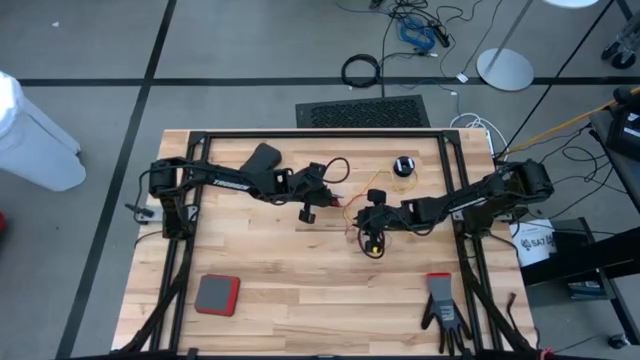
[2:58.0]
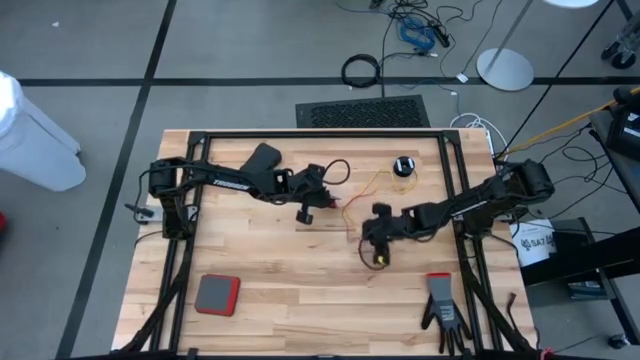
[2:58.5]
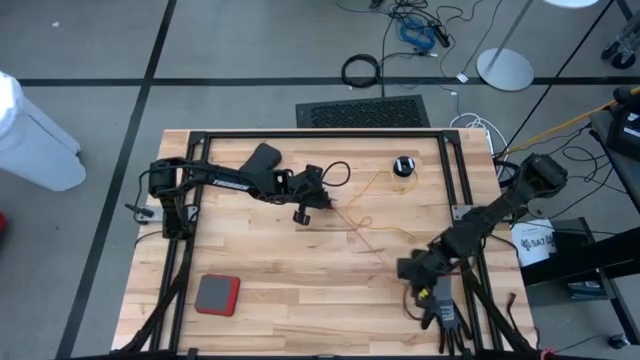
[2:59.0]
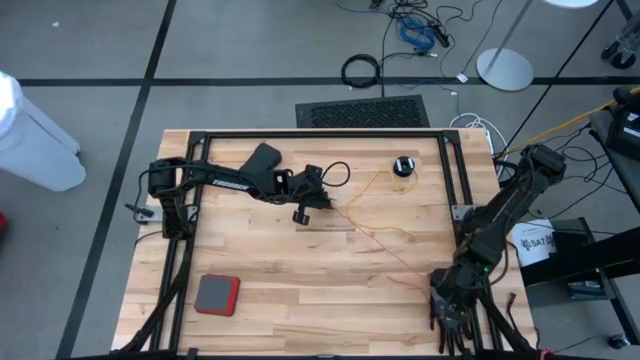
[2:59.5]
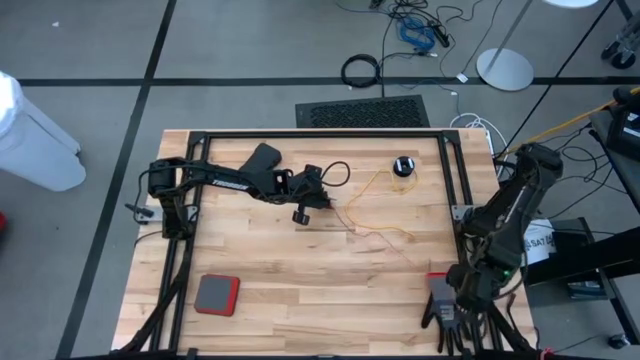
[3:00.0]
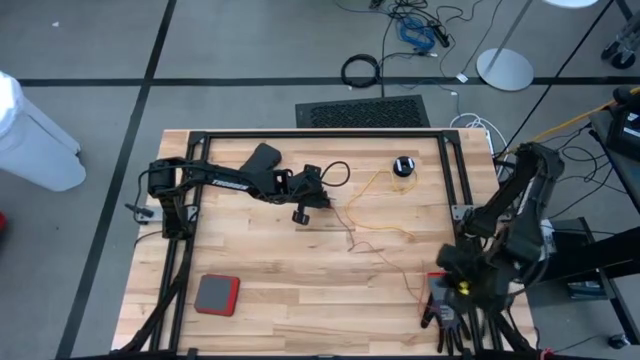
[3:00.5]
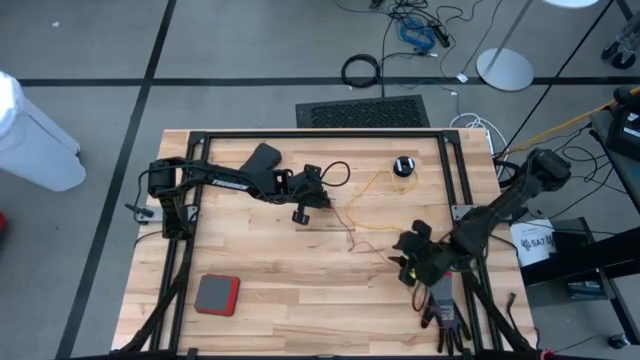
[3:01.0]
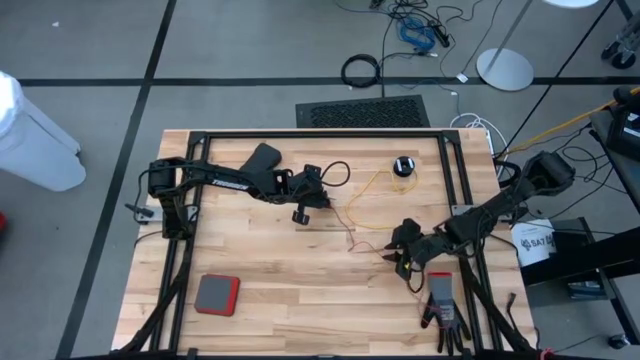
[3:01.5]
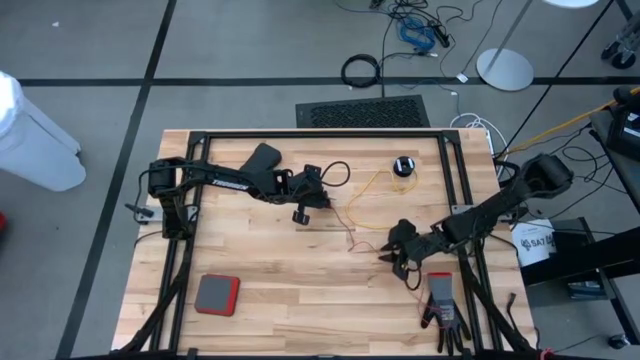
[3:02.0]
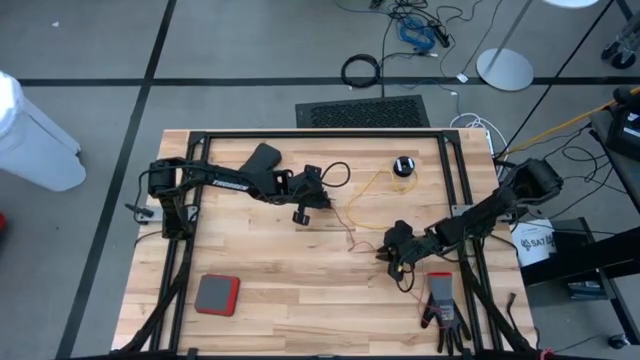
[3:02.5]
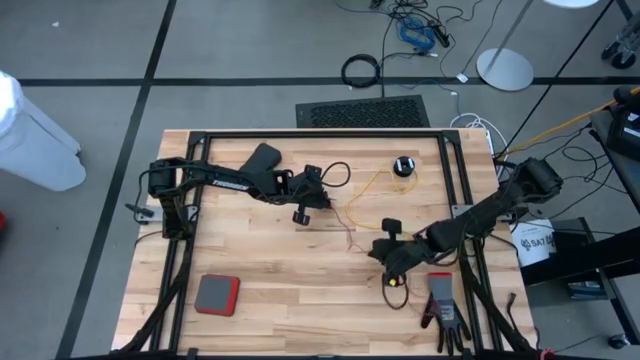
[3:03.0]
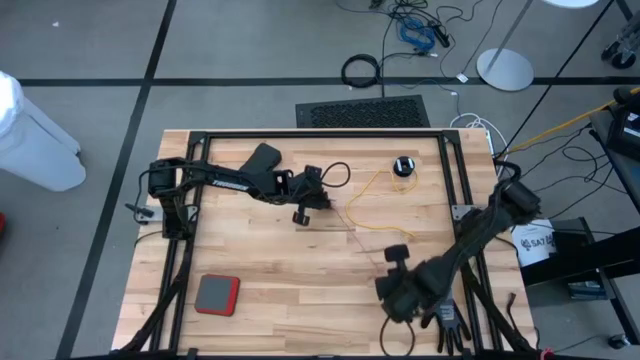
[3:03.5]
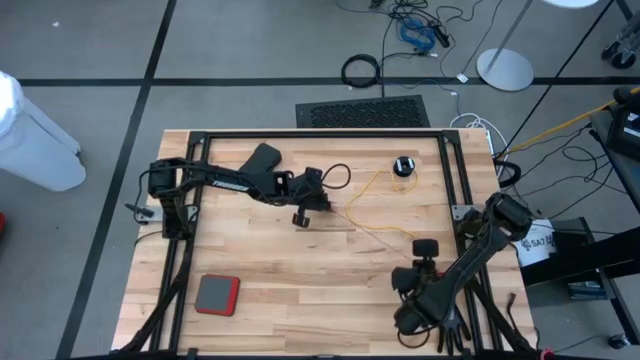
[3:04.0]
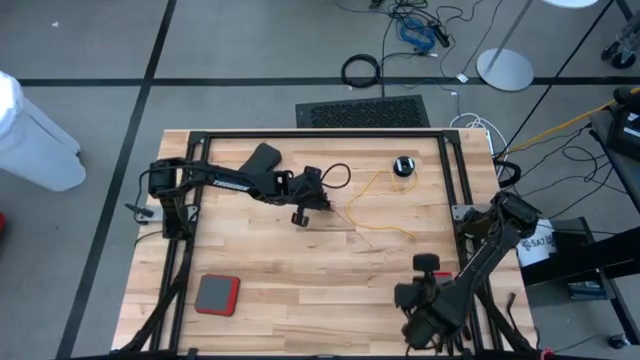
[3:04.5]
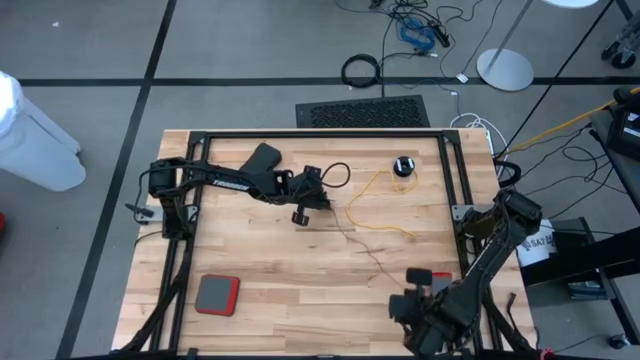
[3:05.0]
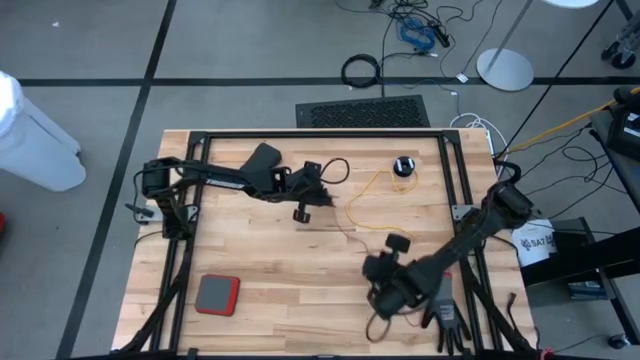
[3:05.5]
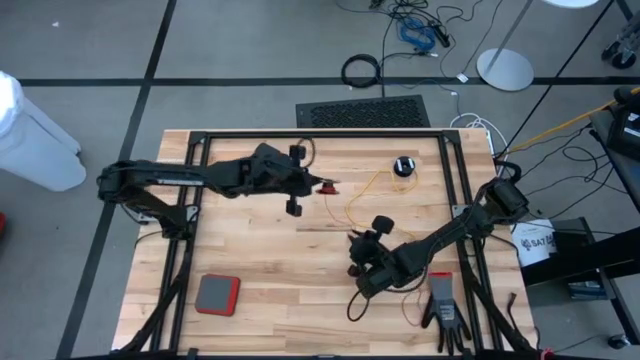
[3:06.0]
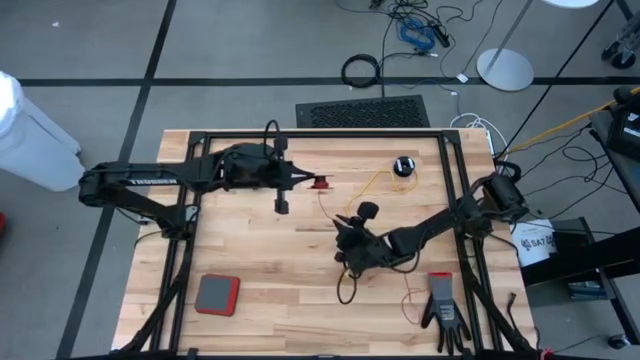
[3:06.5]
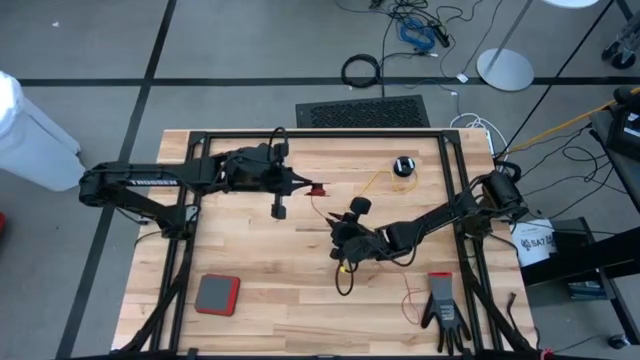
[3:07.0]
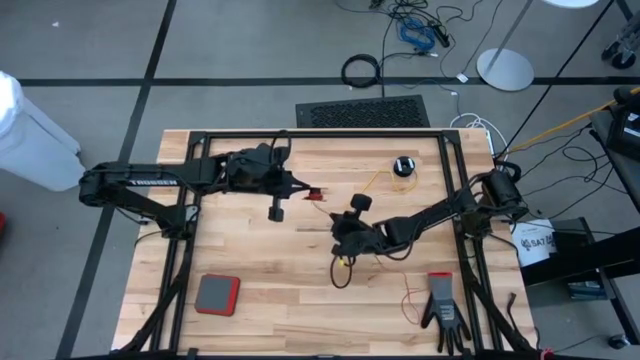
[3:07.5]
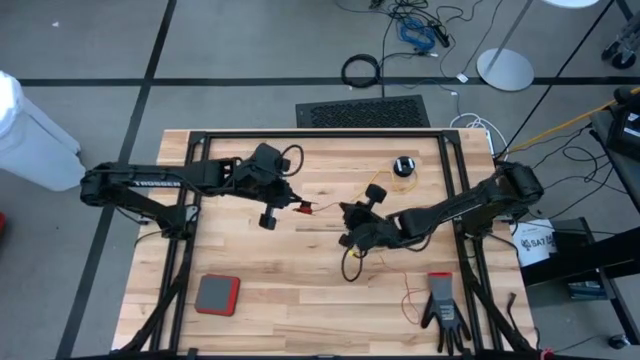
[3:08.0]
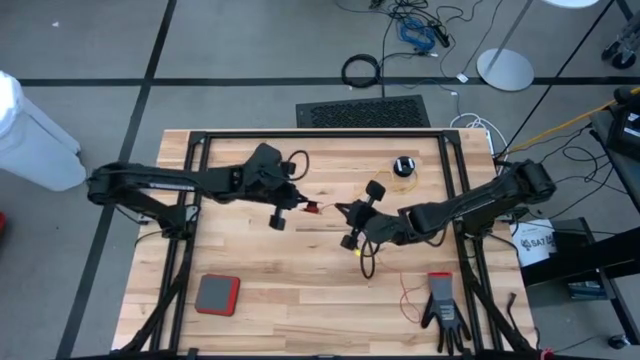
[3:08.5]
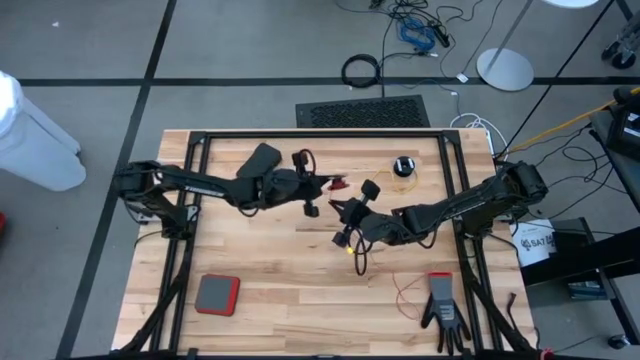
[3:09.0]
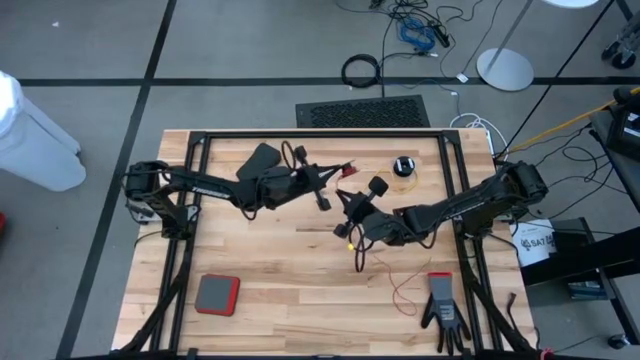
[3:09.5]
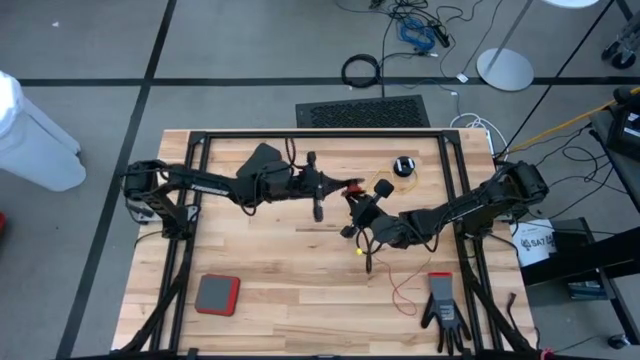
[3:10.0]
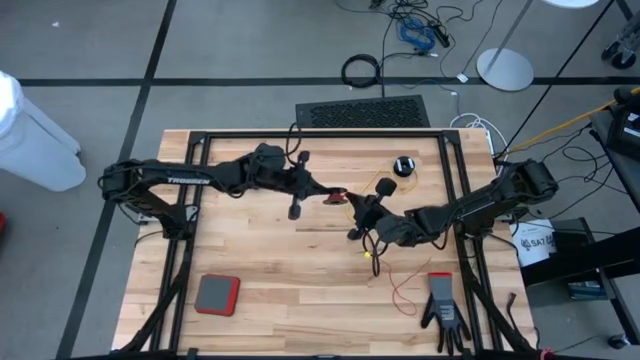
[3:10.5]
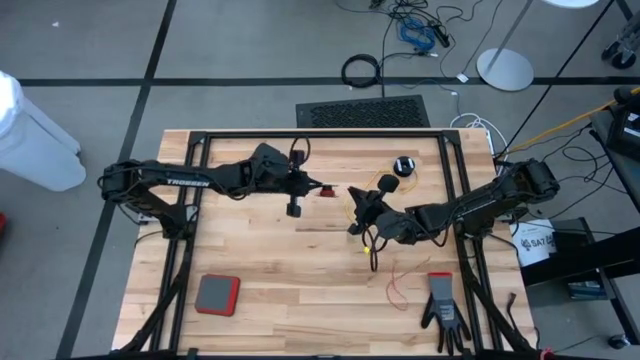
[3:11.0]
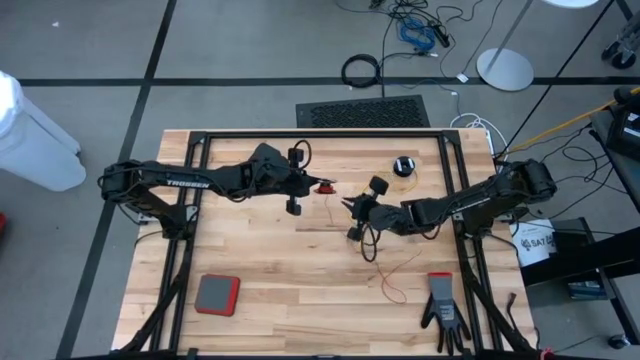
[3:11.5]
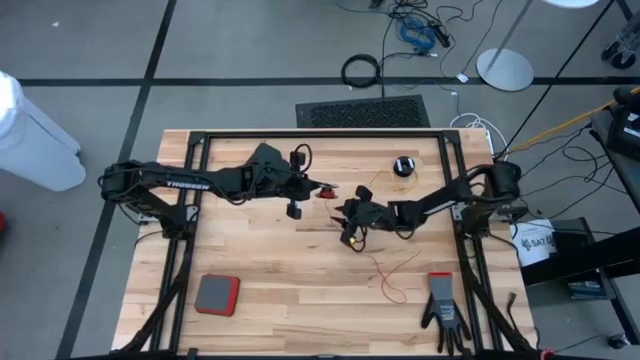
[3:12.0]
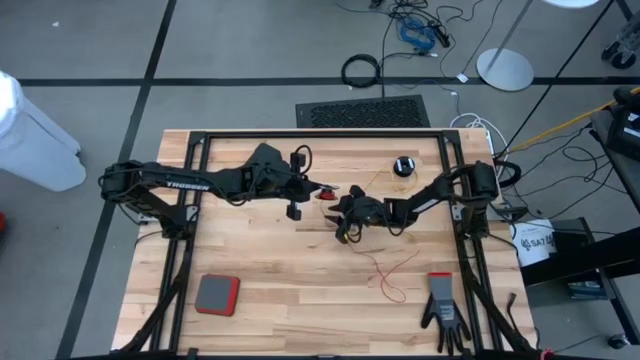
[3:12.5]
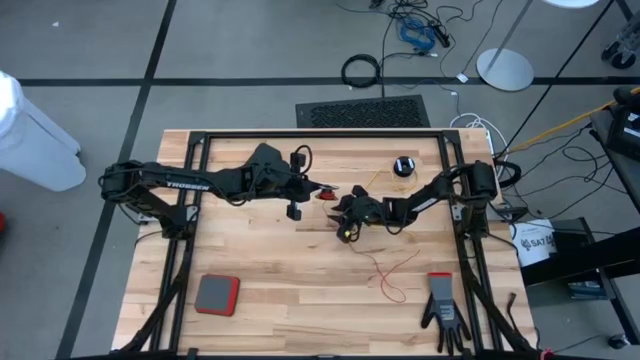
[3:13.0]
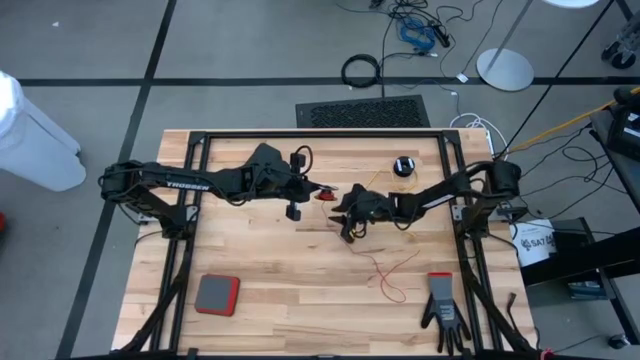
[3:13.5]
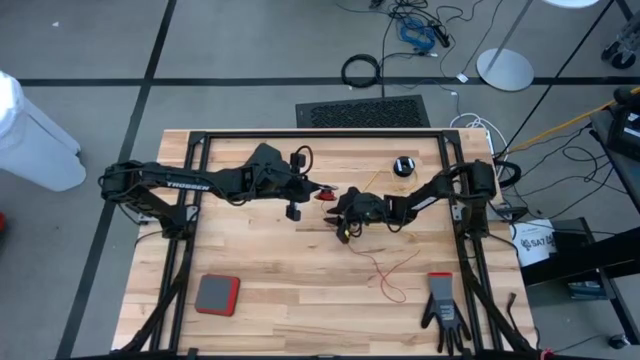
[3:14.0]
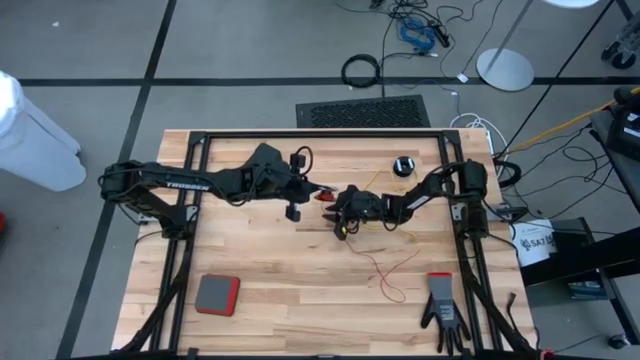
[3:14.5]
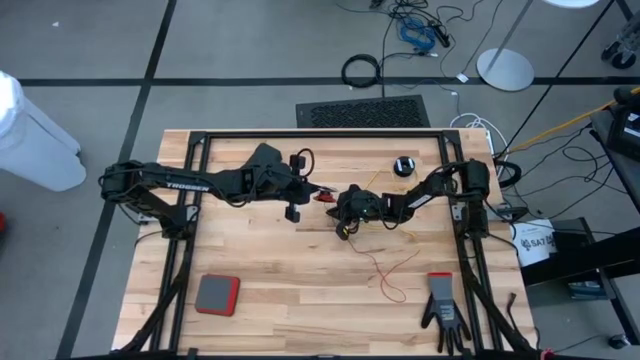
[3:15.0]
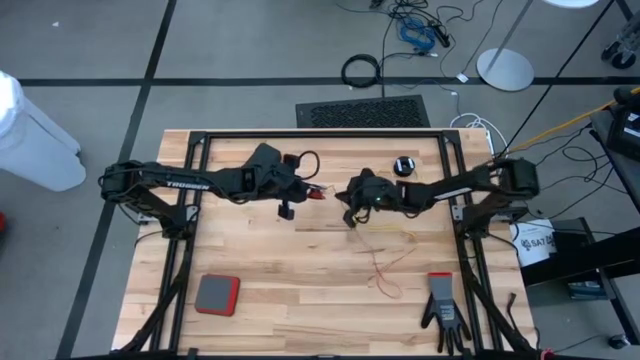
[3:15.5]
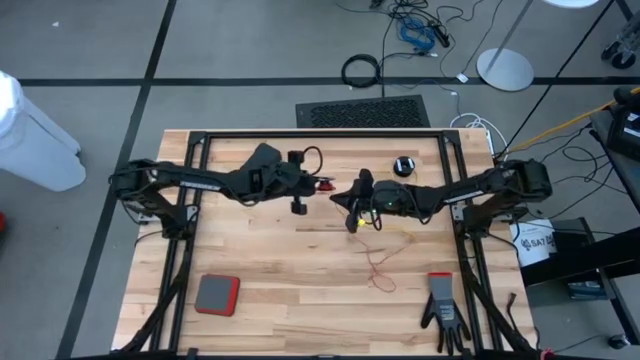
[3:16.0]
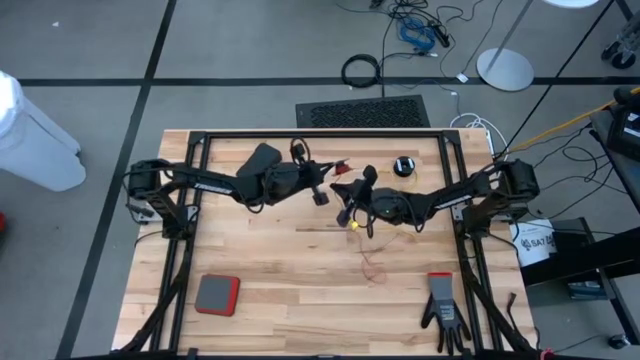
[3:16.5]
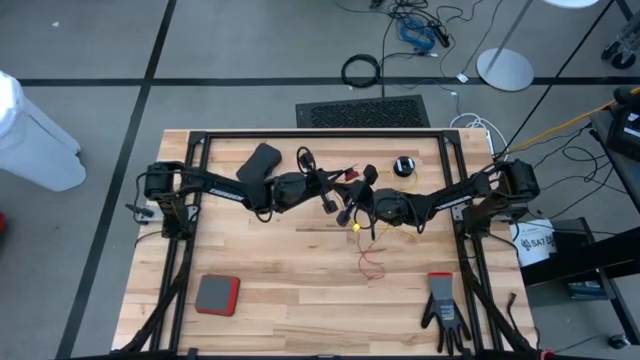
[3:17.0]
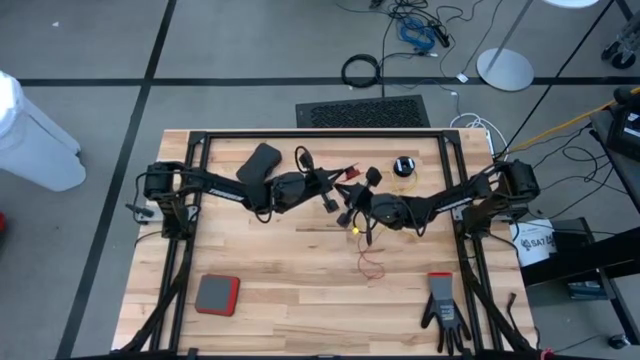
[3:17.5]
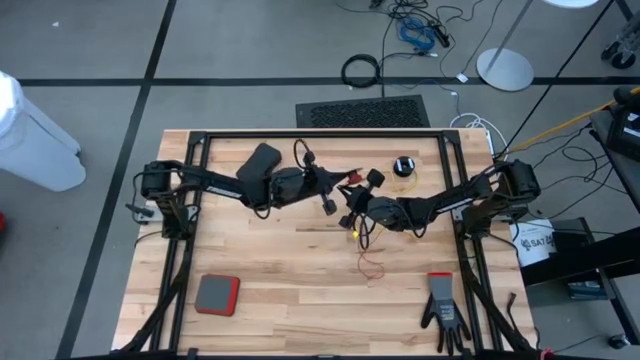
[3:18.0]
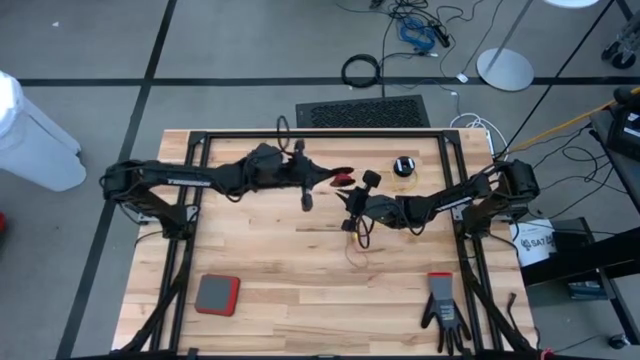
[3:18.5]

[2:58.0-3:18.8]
Task: Coil cords
Coil the red wire on the spool

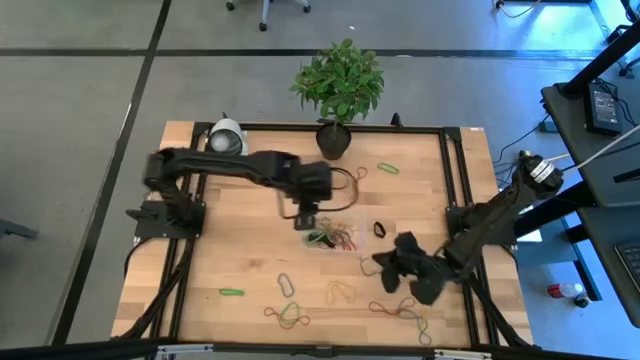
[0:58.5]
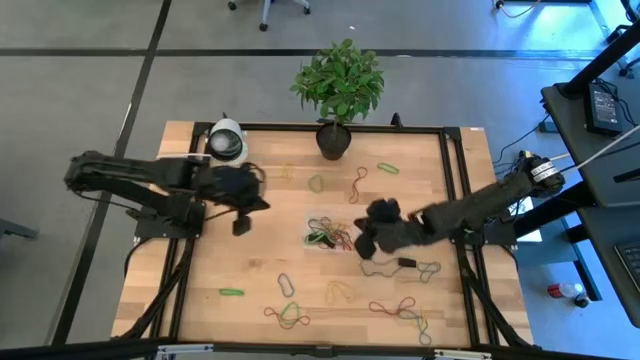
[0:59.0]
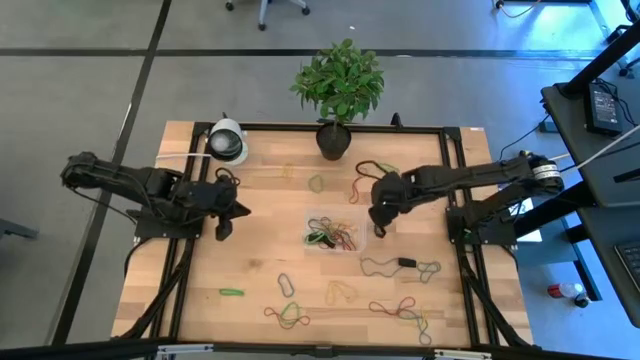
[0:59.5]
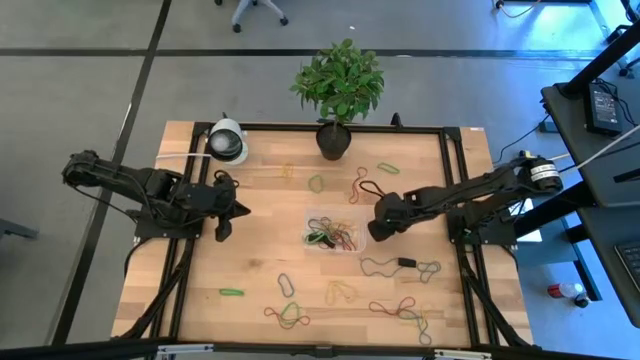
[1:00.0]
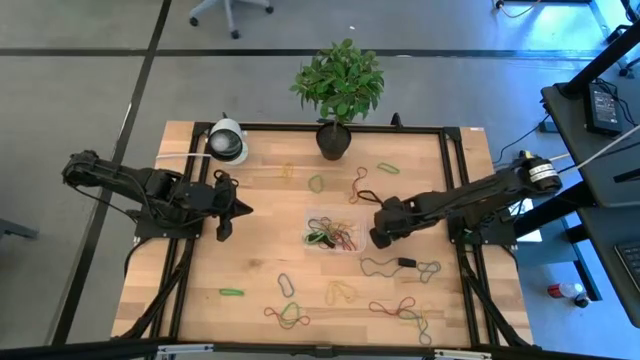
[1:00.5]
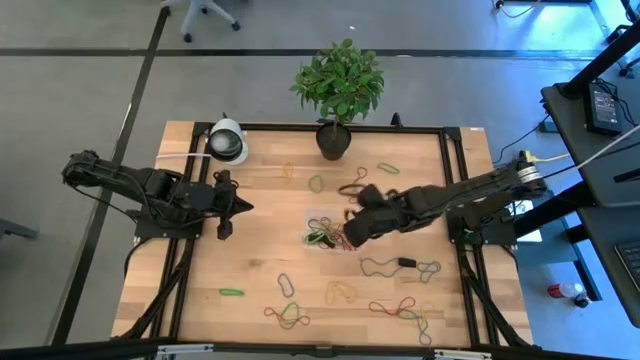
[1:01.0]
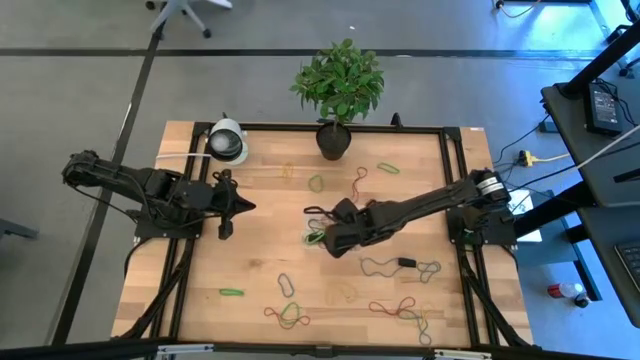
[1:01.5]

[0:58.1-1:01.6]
Task: Pick and place rubber bands into bin
Put the black rubber band into the bin
